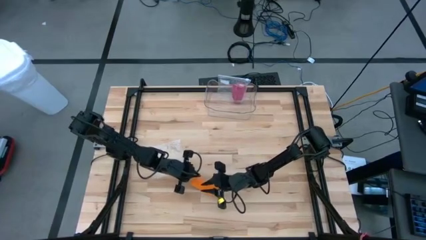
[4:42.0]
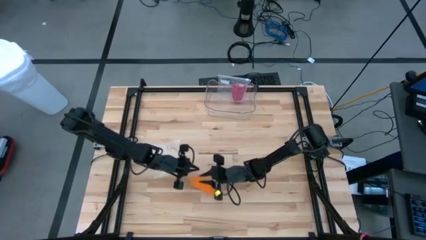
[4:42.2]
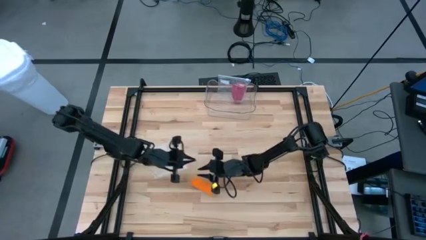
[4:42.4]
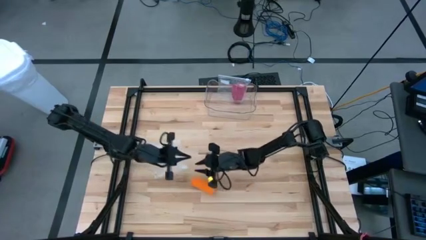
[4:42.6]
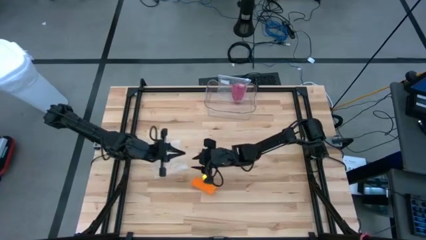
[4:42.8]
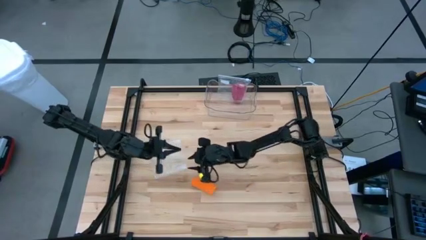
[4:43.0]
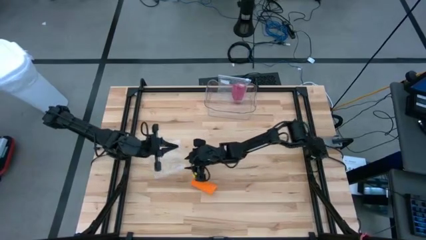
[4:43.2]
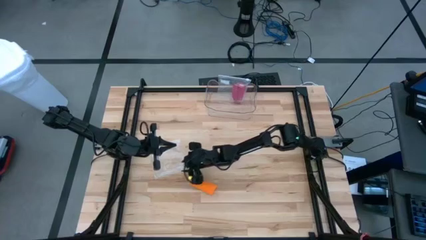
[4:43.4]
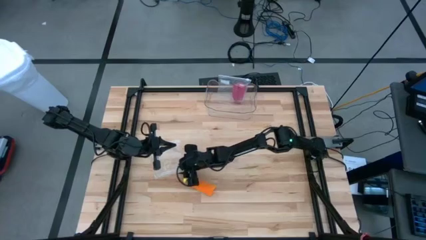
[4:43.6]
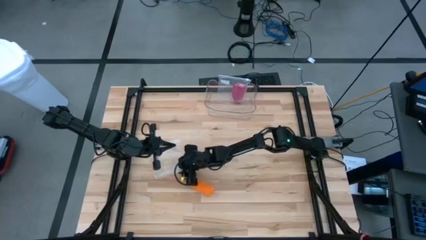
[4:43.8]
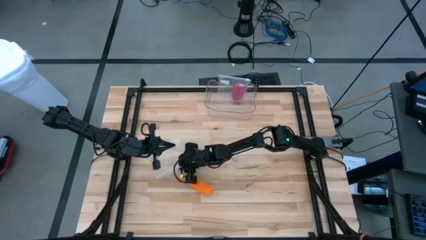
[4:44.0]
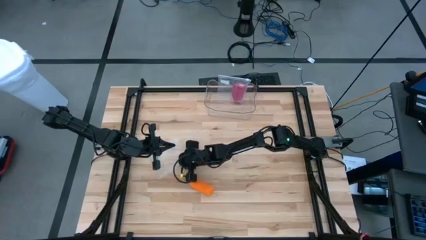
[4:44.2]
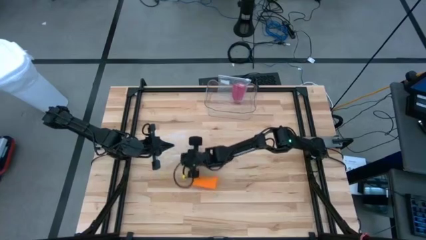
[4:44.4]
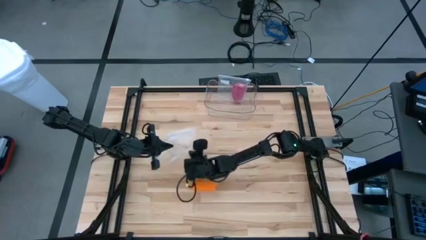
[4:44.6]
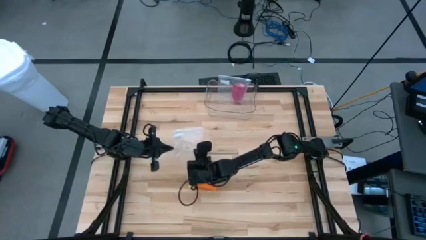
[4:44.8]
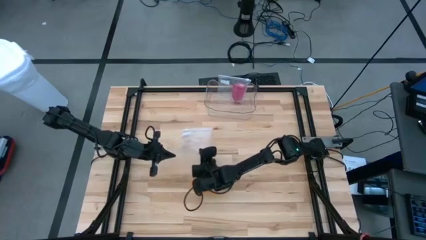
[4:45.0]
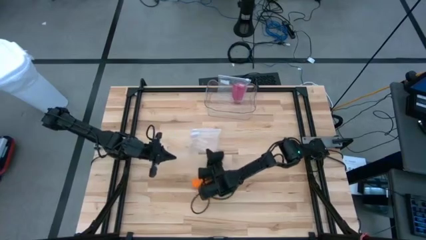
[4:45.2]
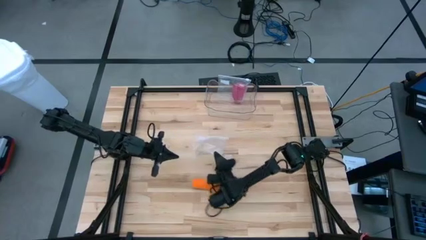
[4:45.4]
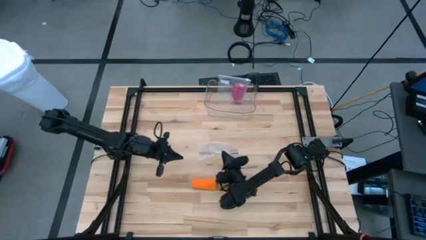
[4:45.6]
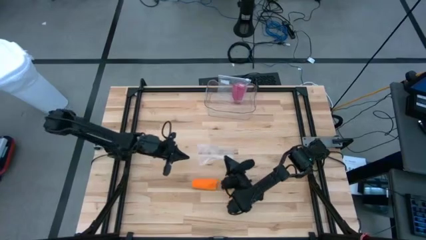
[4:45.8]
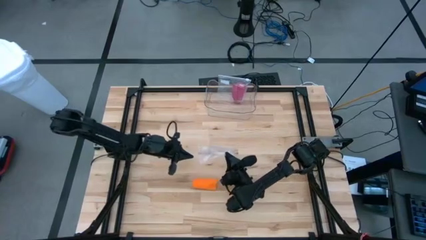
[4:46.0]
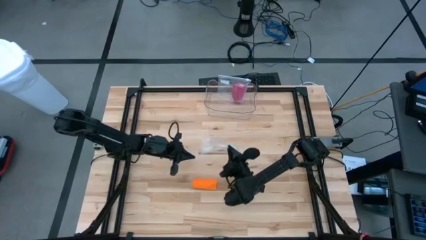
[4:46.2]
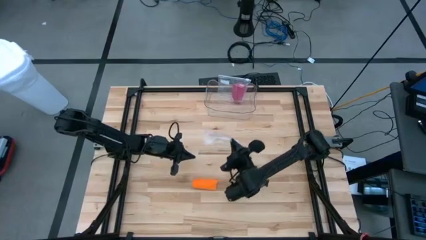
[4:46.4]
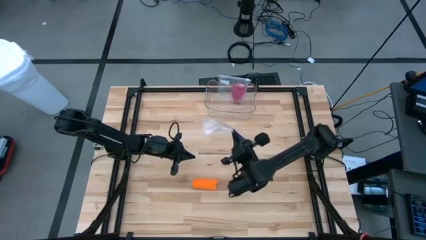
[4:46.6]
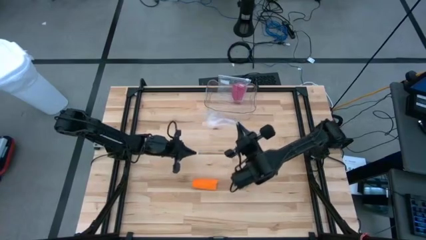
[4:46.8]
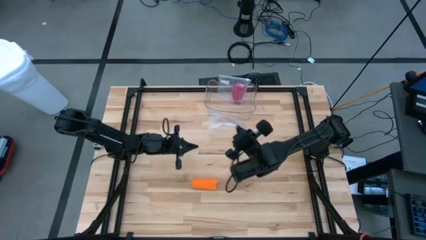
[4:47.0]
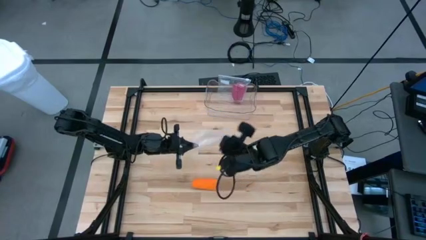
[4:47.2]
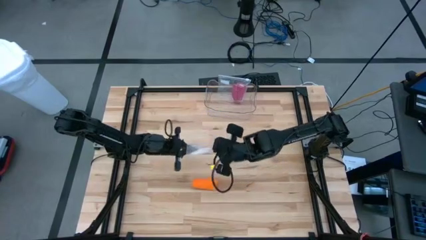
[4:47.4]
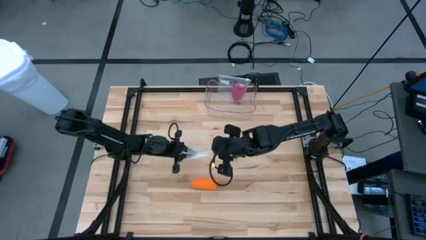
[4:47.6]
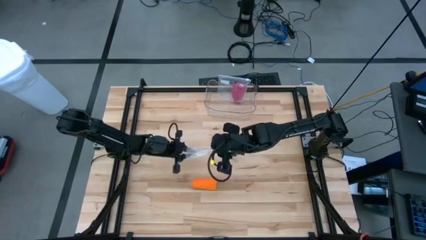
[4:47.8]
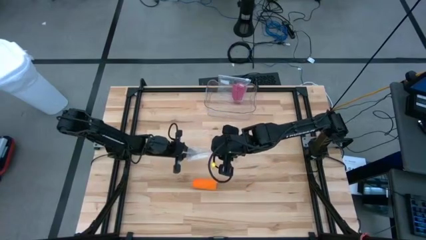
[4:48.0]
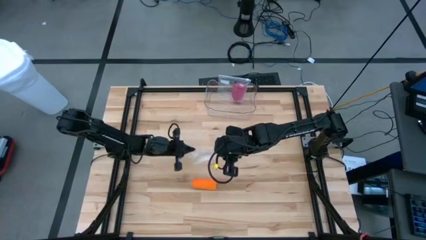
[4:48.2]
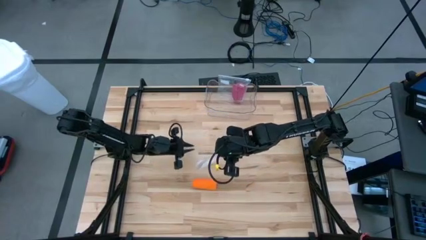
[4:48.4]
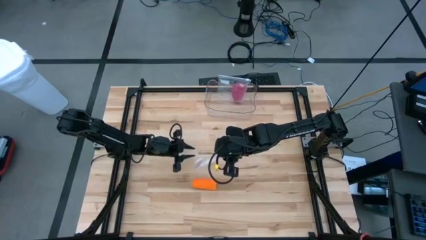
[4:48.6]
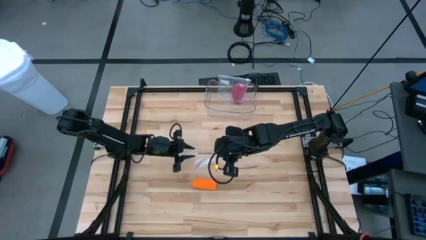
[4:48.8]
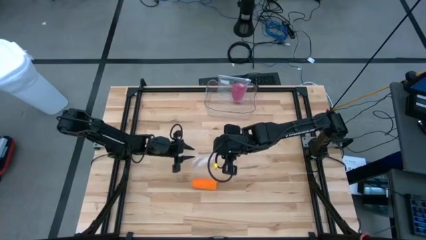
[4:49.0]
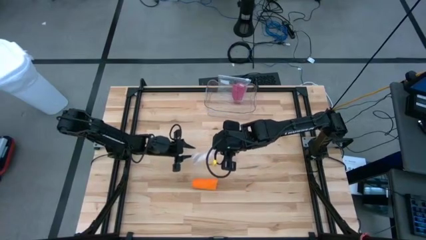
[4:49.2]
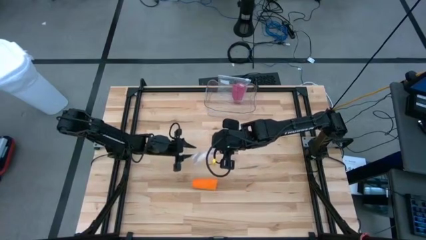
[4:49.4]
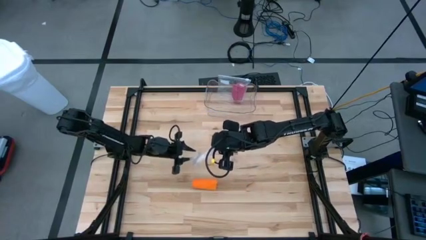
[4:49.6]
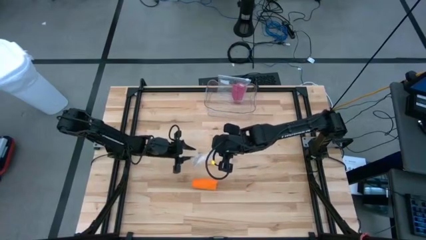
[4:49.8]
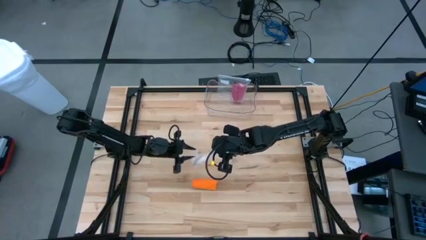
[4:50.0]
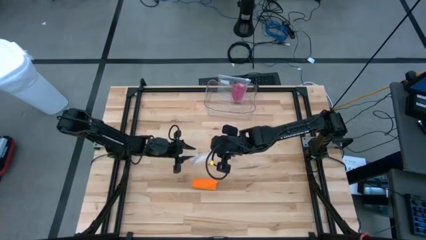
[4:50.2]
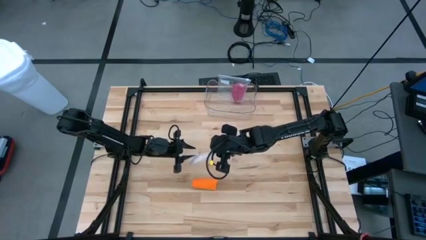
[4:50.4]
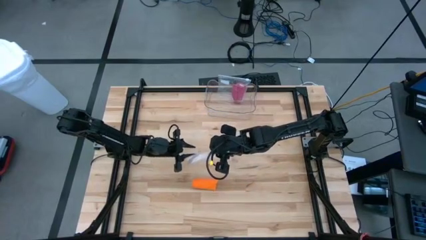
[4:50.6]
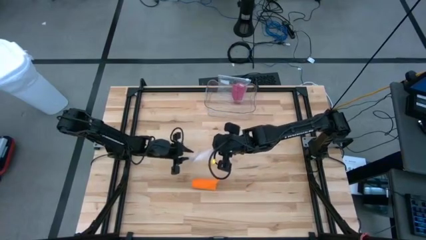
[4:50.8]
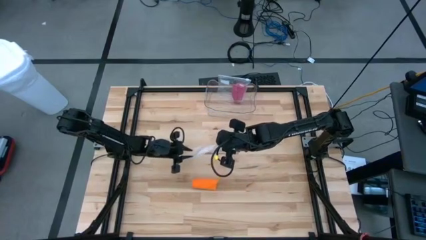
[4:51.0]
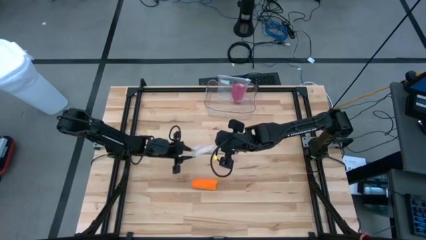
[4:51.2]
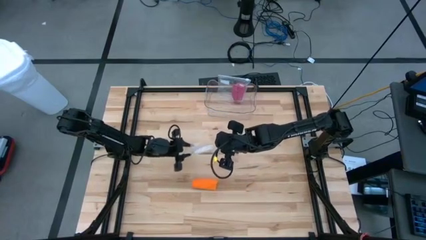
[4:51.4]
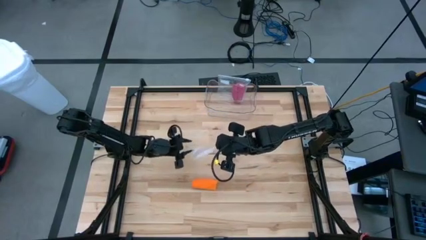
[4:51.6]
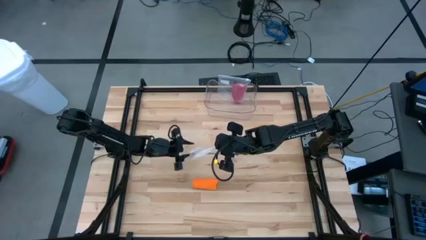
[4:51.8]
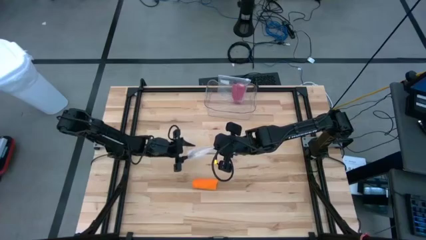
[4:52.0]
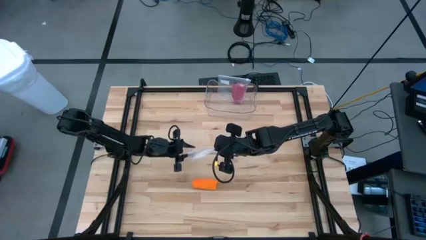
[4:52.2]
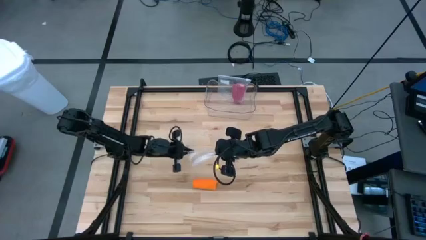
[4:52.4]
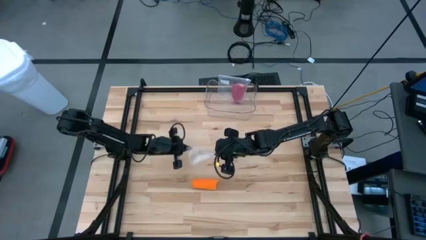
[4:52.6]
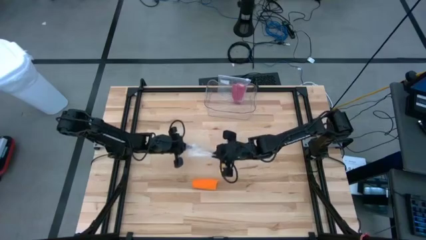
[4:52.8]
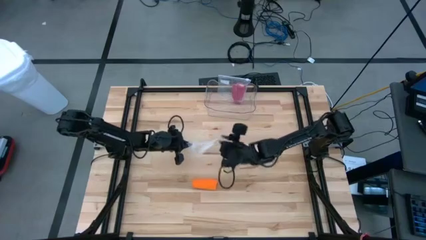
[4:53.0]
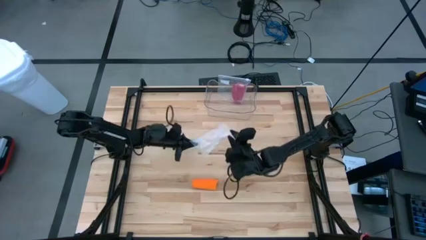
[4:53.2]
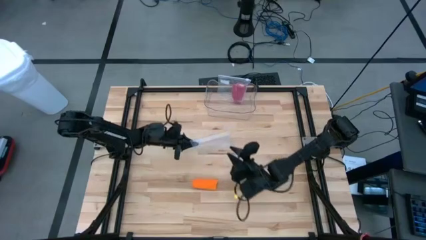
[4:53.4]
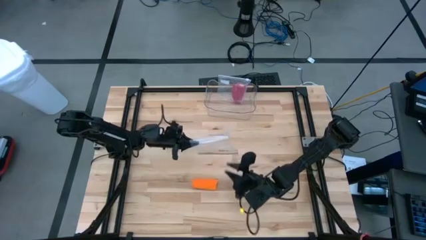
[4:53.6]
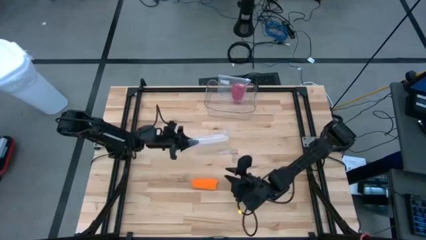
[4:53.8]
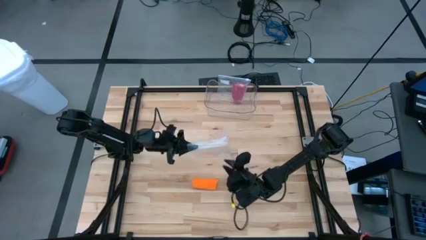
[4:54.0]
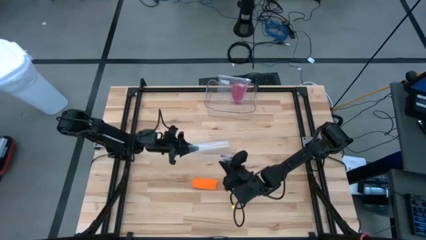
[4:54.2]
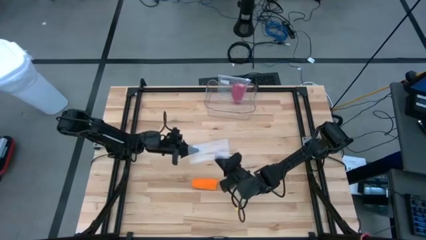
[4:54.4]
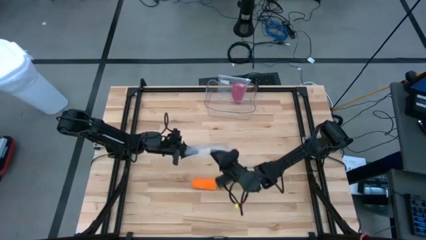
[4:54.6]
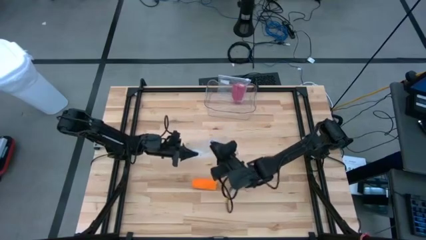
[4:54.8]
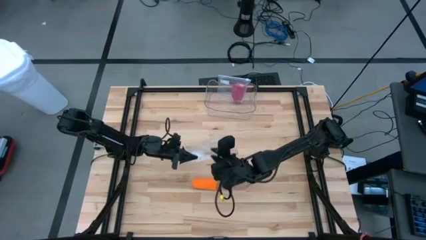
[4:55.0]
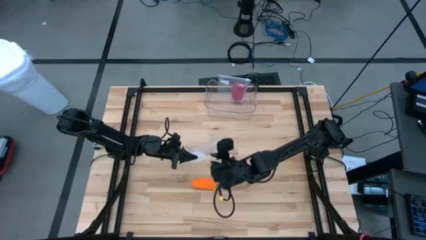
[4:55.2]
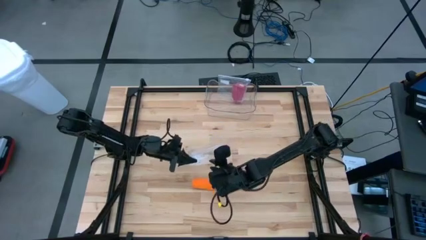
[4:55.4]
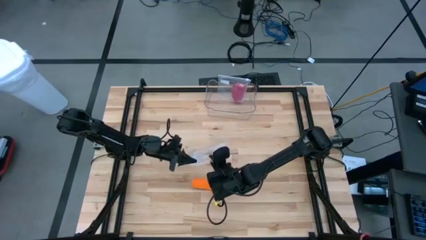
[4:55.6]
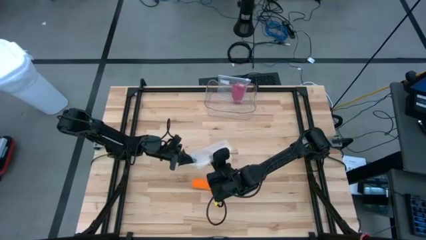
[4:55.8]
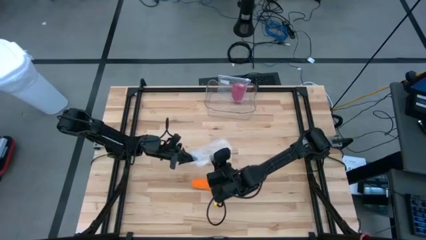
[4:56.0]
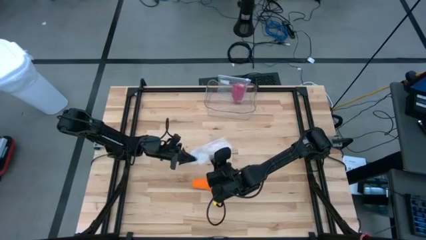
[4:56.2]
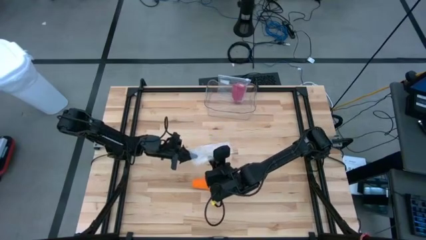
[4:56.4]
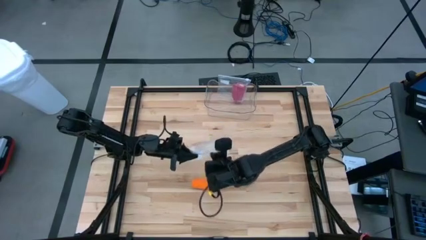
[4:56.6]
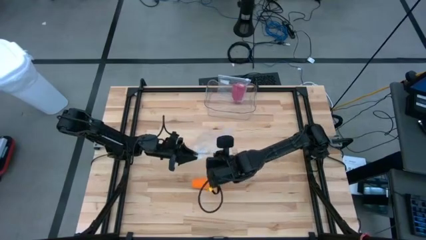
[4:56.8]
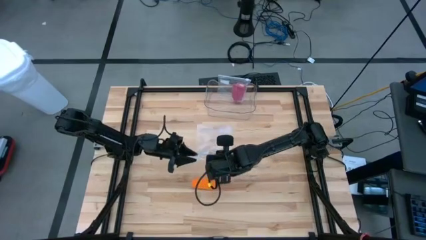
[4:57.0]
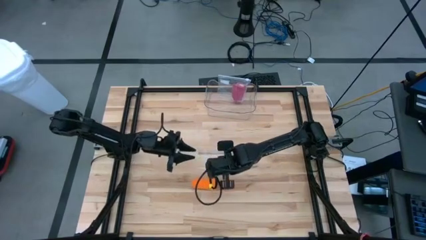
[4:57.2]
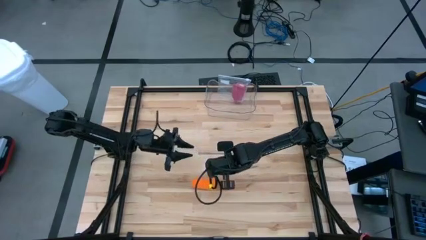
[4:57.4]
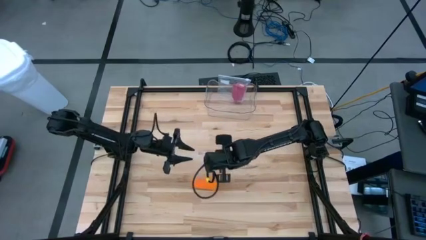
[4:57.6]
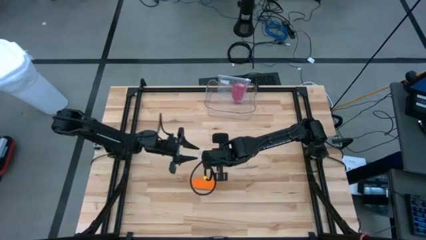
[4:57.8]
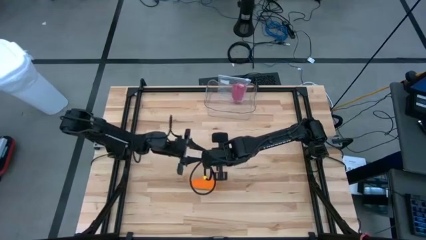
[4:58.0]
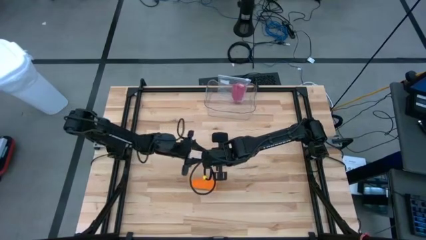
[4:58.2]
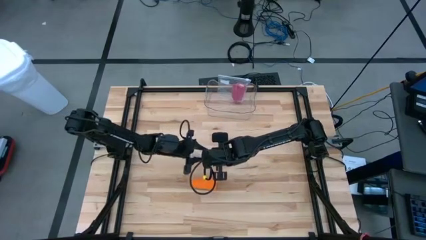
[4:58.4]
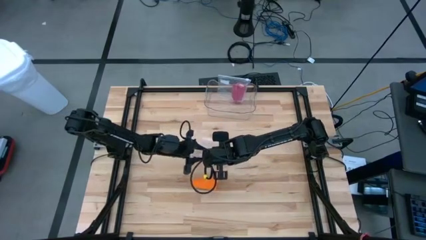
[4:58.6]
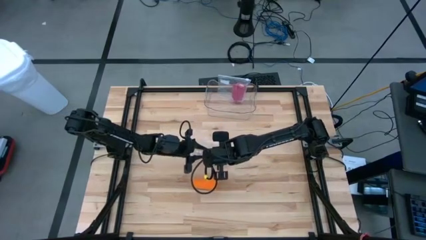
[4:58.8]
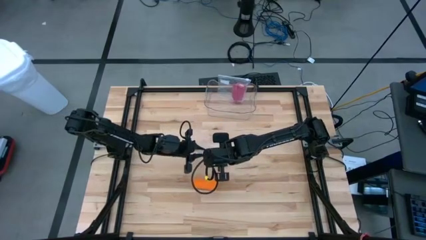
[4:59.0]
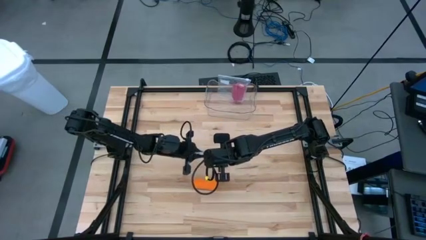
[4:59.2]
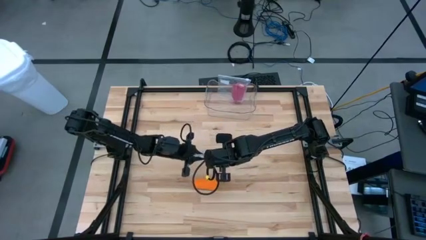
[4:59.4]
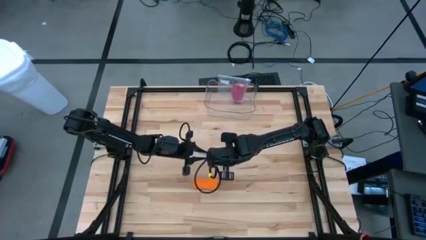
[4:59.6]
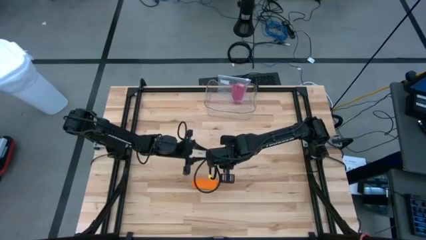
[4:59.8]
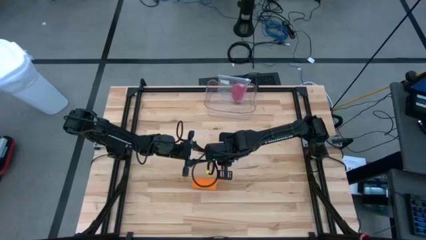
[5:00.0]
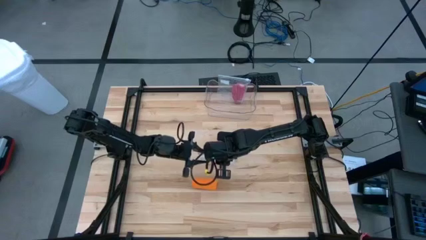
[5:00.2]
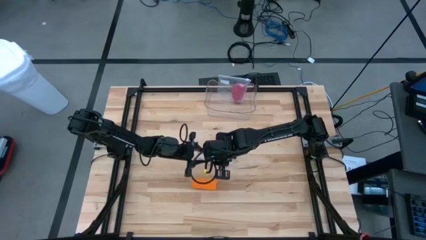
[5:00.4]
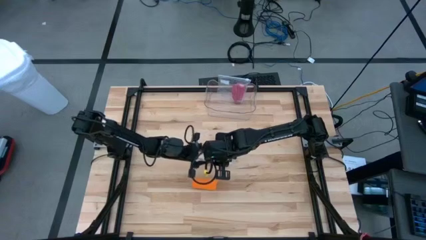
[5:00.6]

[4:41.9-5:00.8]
Task: Roll bandage
Put the orange bandage into the zip bag
